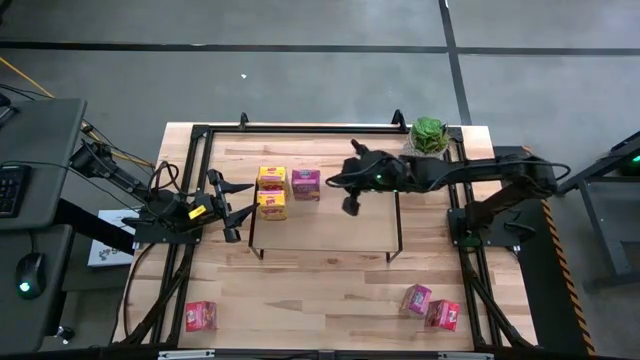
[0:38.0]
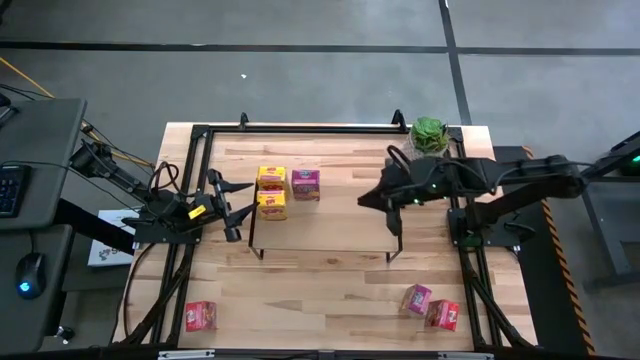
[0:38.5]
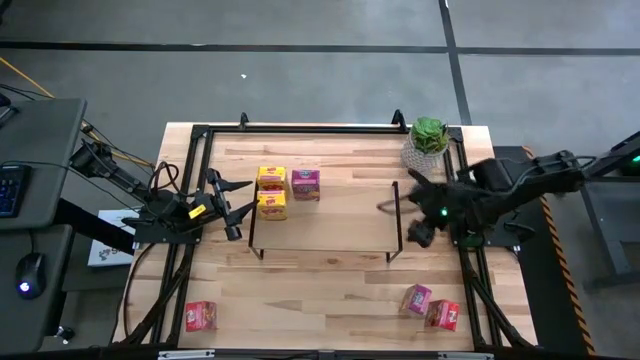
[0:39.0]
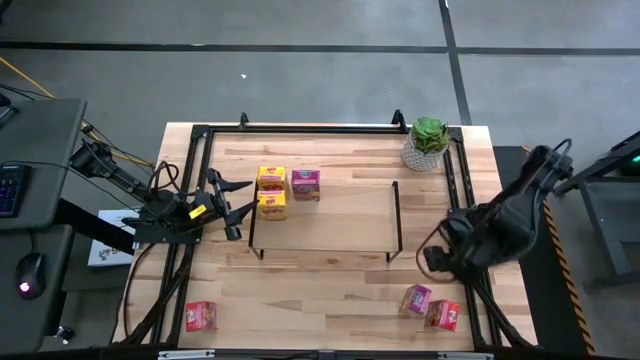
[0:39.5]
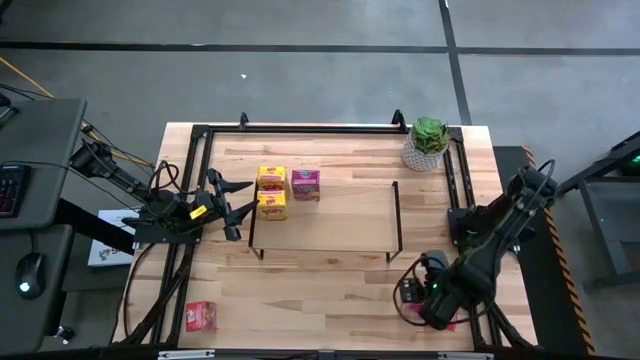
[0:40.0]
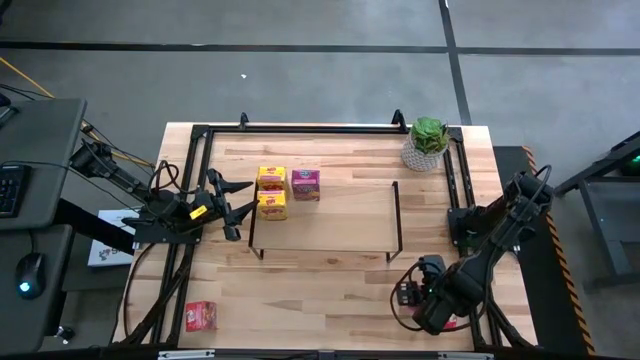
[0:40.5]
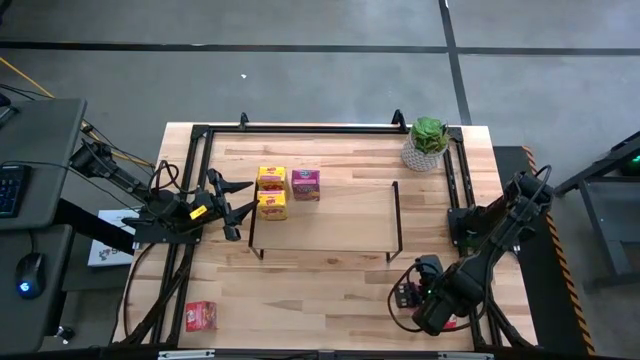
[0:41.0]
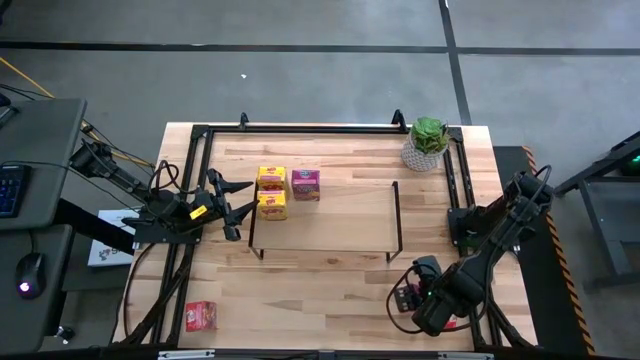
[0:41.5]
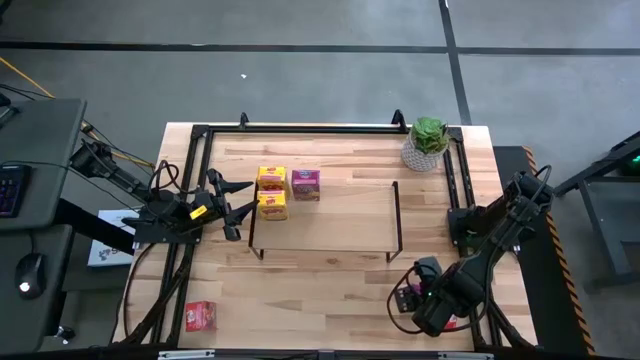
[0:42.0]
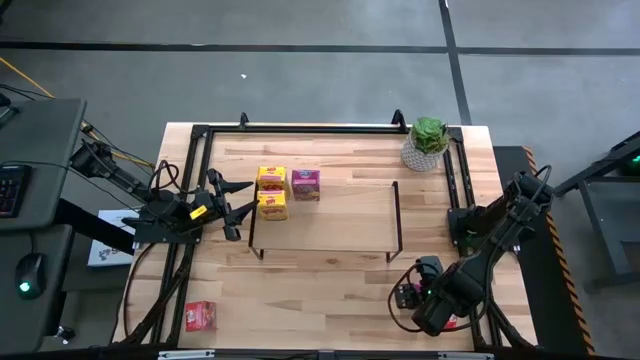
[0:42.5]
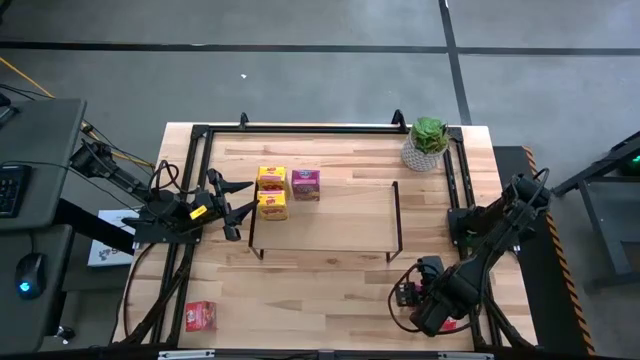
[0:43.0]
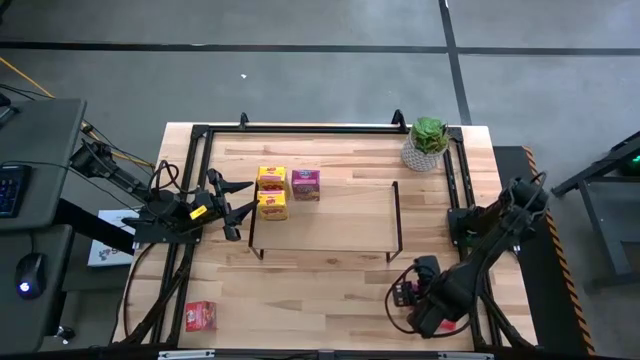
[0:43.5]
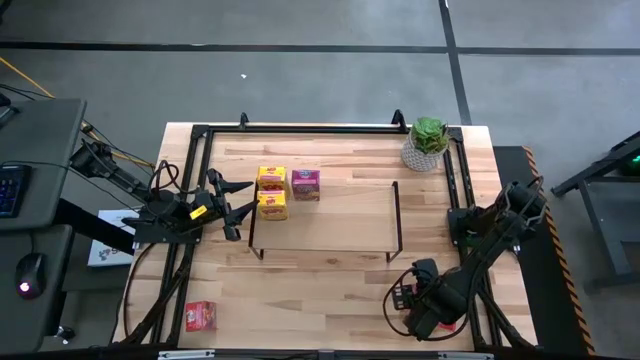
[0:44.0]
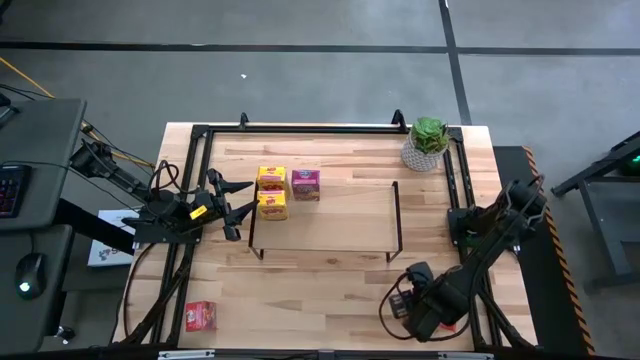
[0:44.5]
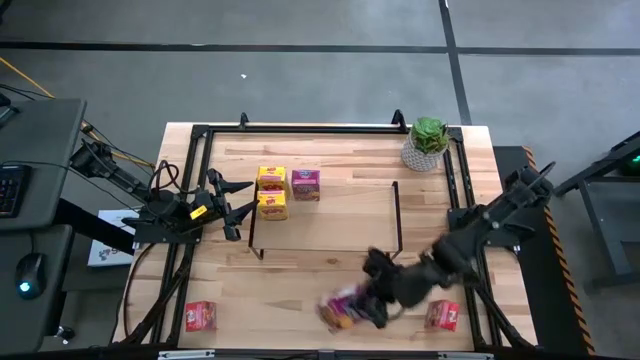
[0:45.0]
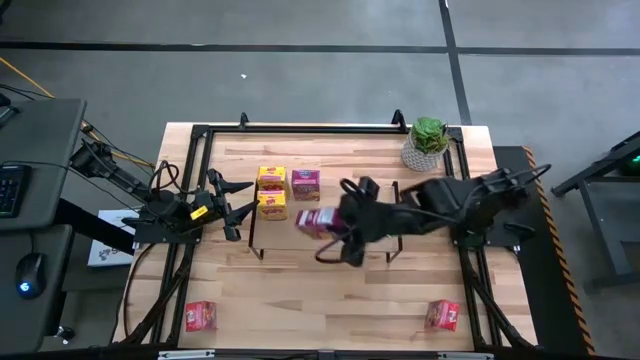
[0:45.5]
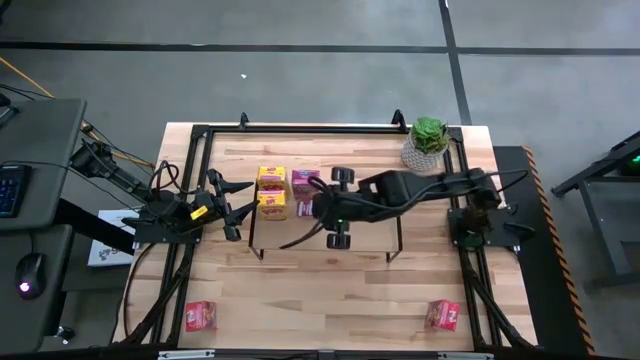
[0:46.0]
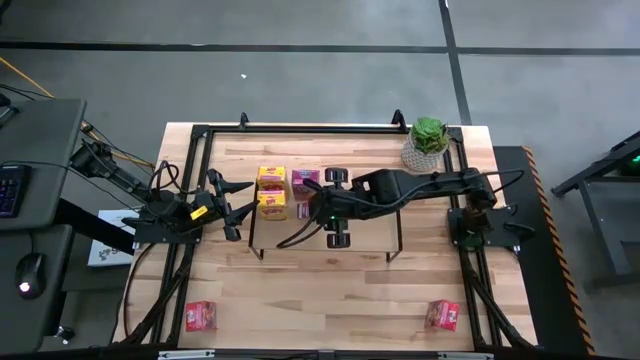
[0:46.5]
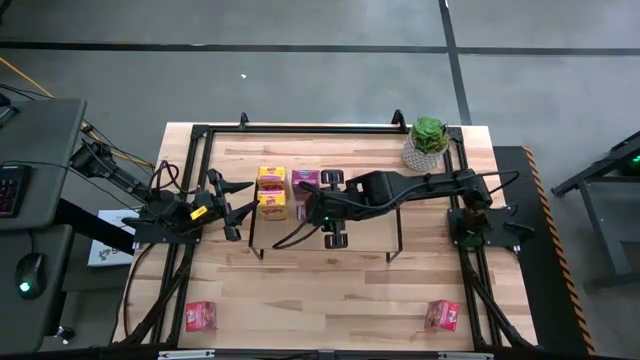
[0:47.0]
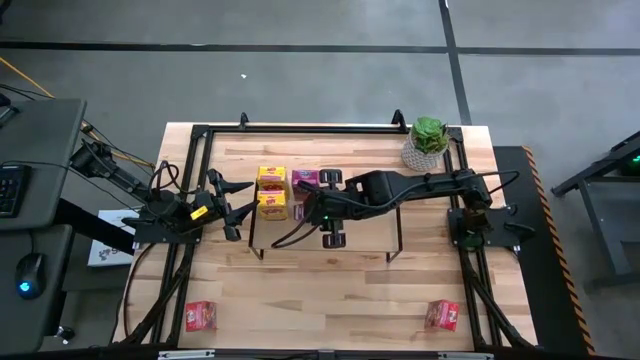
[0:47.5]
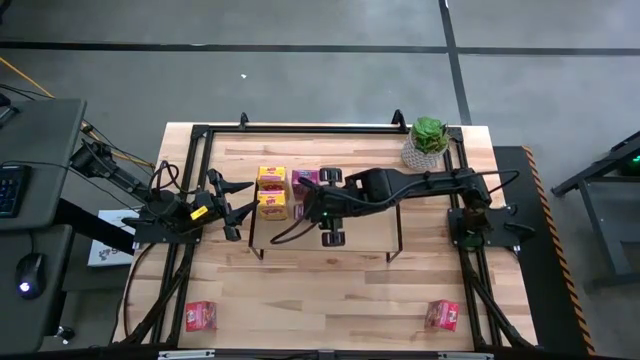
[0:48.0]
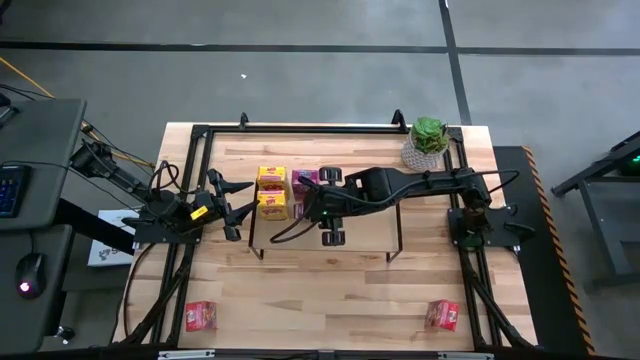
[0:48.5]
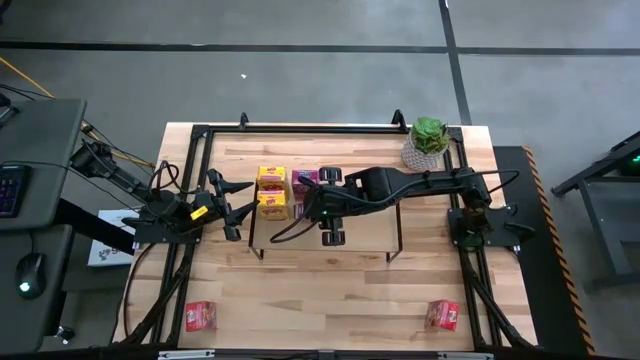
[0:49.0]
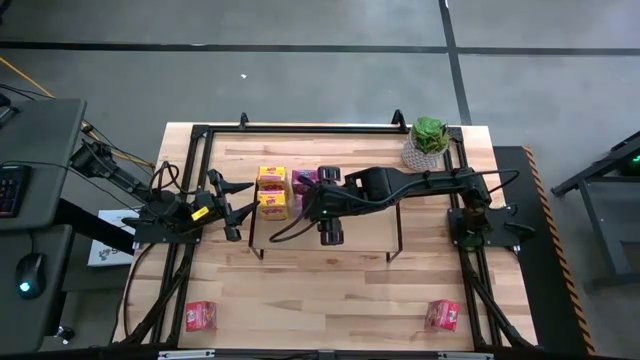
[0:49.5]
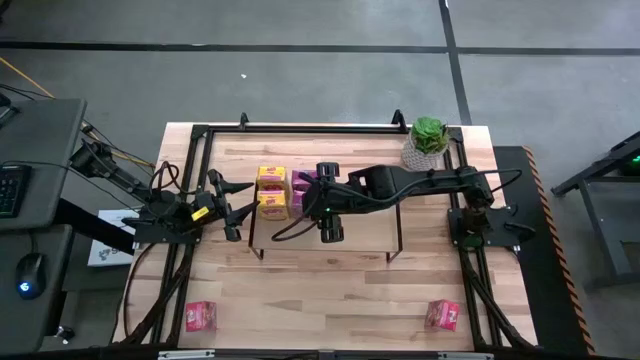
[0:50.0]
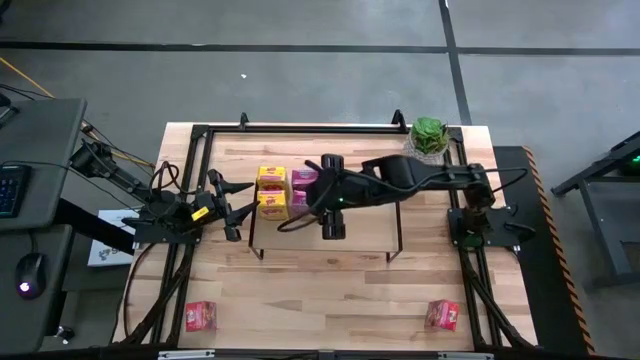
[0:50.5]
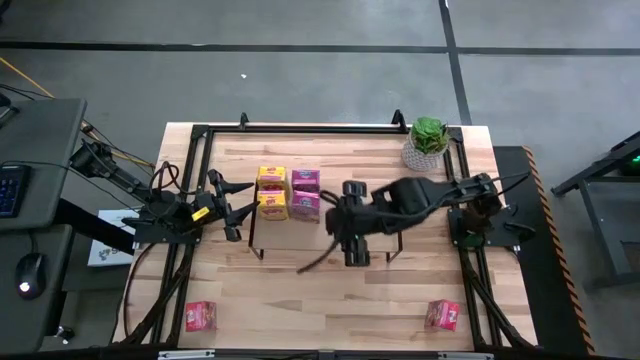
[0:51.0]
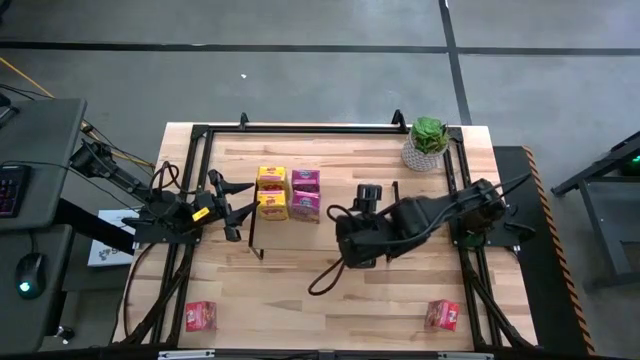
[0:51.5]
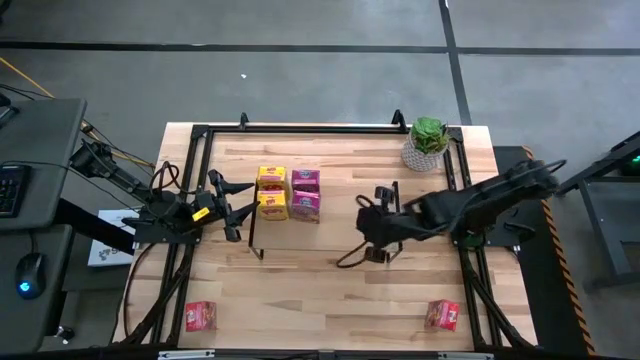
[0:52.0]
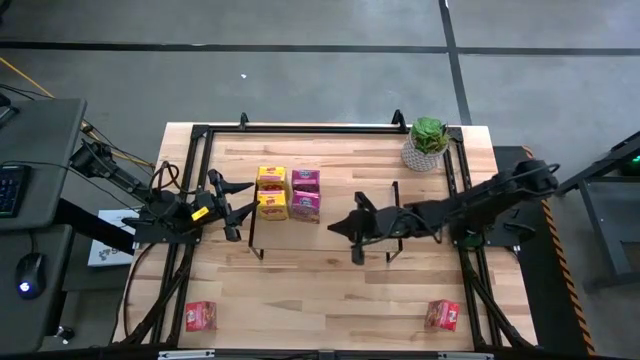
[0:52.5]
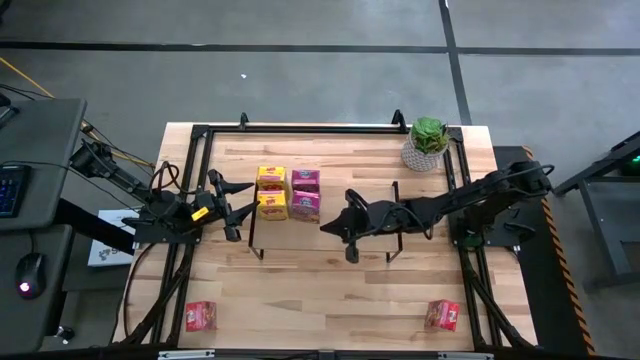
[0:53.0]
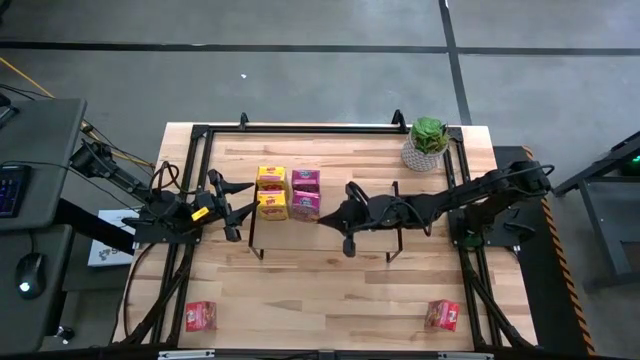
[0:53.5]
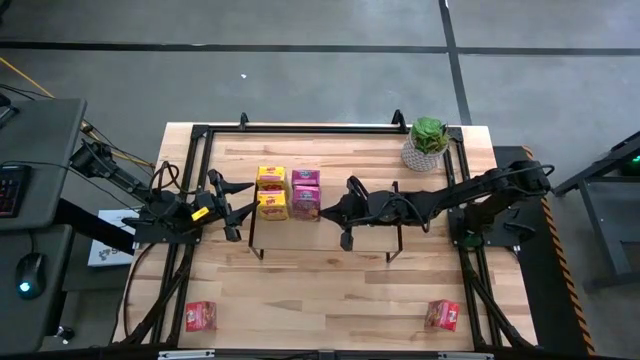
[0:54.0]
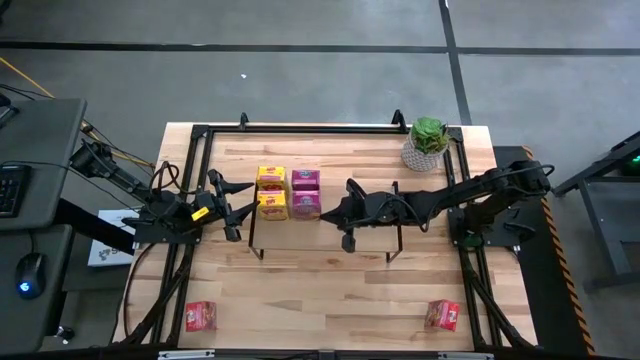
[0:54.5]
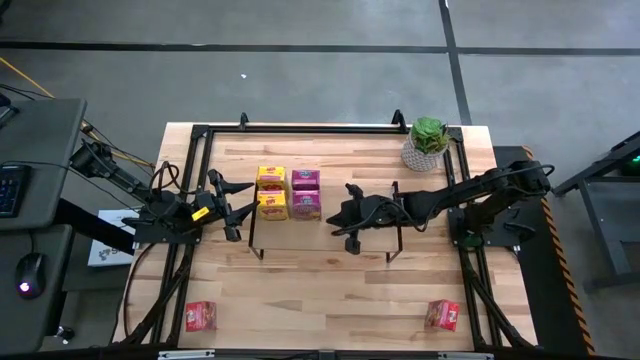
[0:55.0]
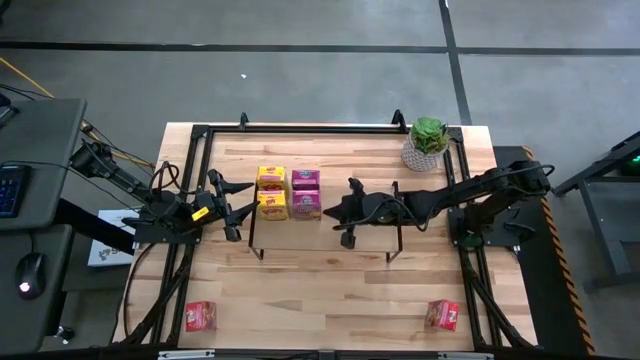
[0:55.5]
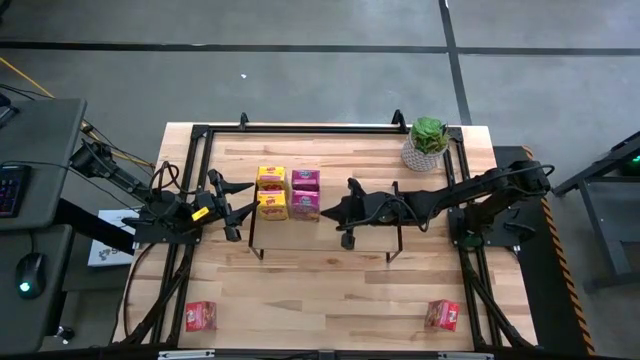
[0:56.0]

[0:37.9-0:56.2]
Task: Stack cereal on shelf
Put the purple cereal box on the shelf

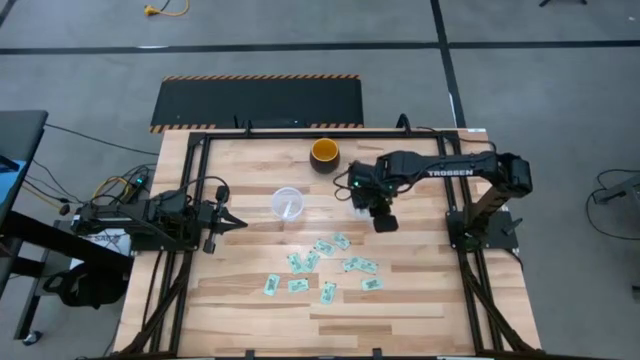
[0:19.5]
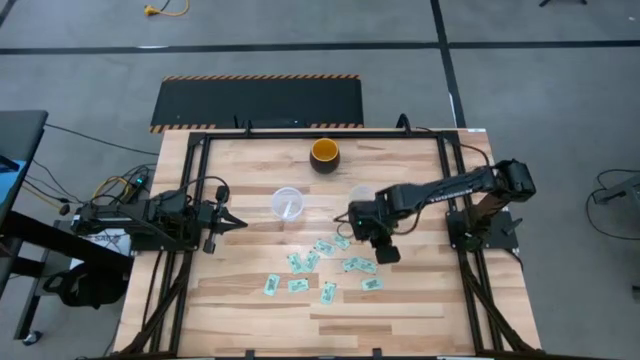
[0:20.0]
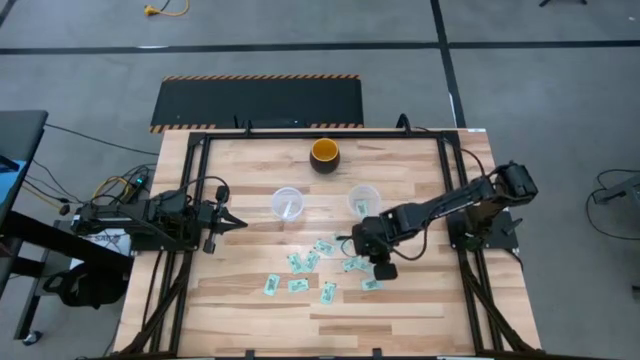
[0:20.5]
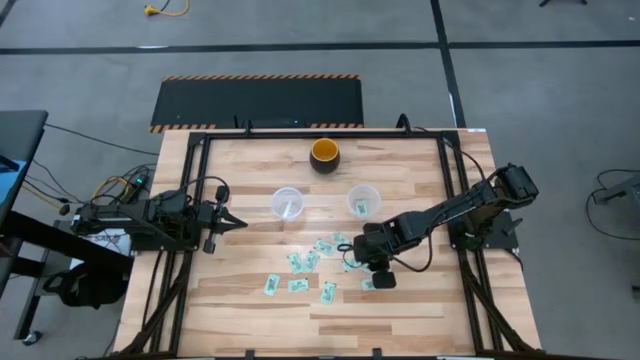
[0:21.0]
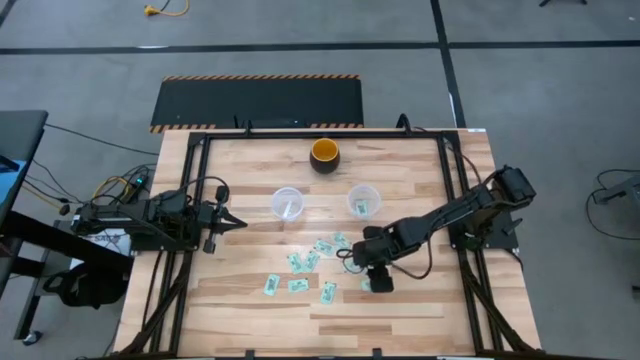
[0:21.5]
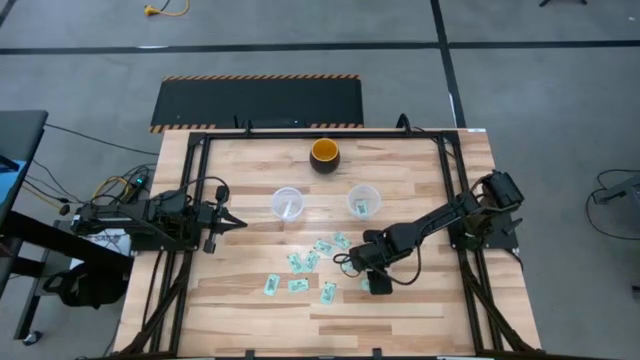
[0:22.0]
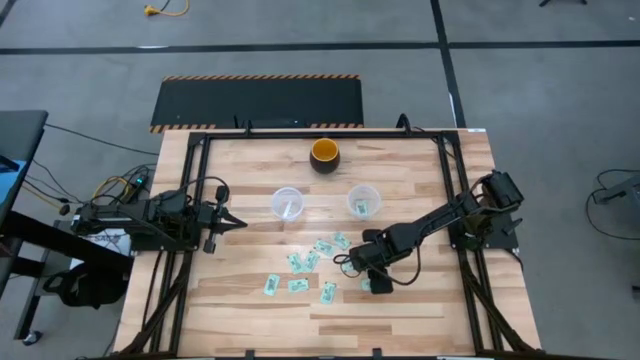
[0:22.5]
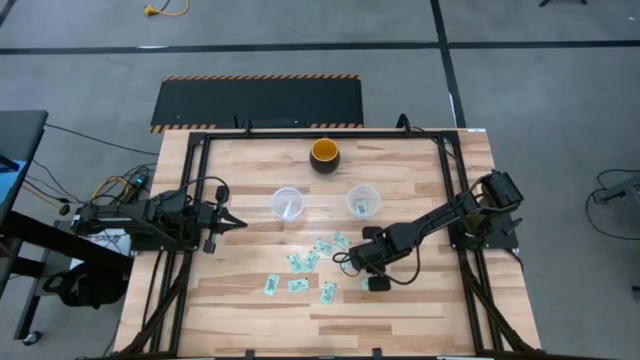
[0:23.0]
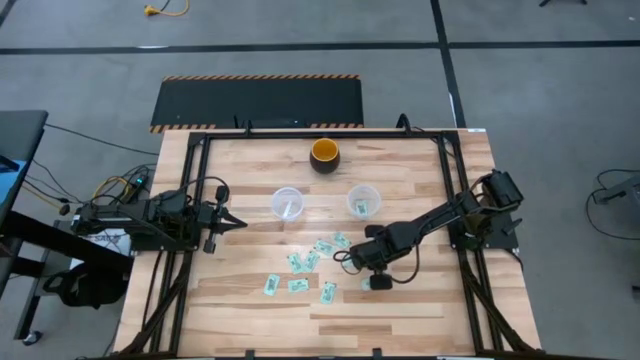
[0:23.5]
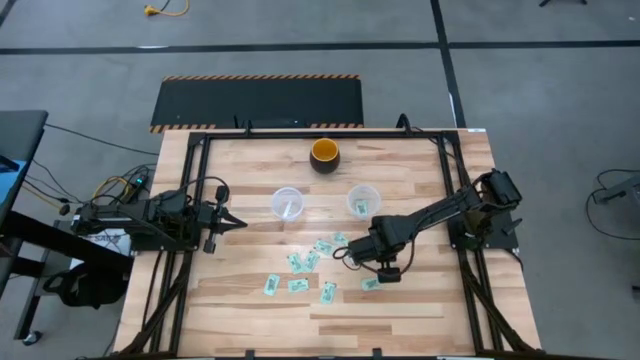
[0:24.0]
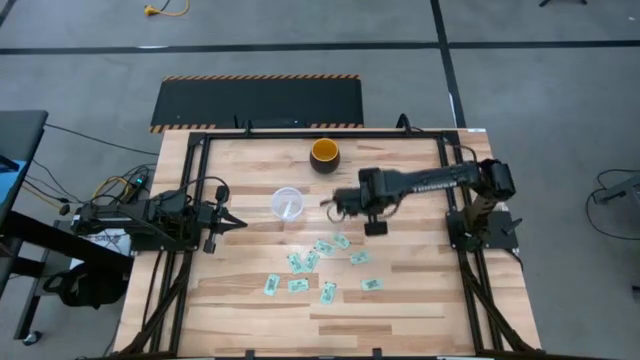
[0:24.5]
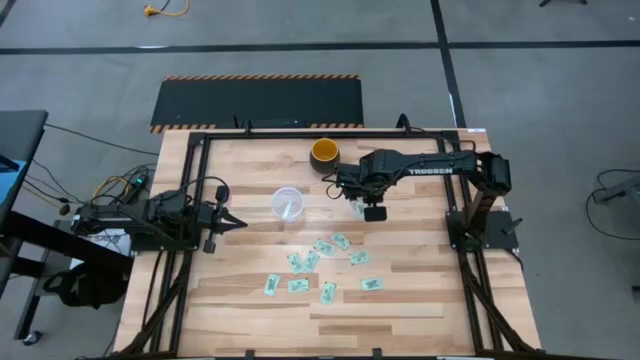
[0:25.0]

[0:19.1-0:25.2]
Task: Pick and place Stevia / Truvia into bins
Put the stevia packet into the right transparent container
